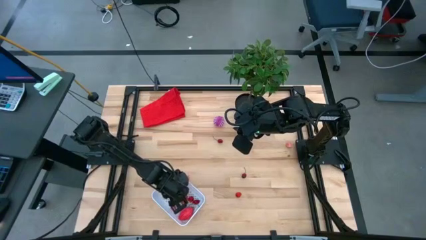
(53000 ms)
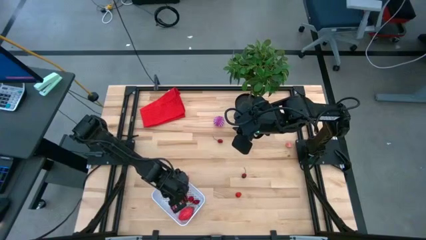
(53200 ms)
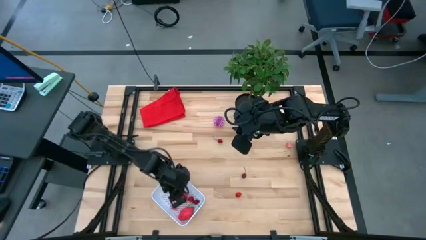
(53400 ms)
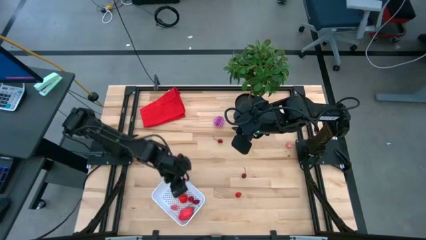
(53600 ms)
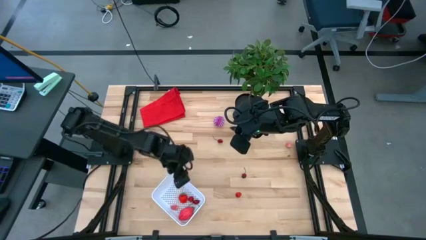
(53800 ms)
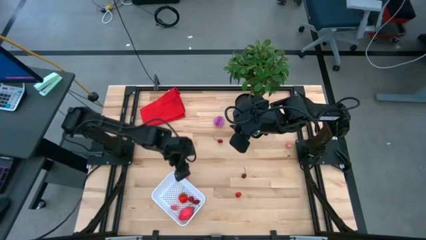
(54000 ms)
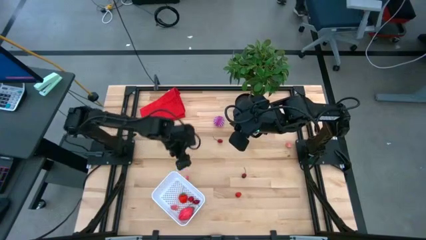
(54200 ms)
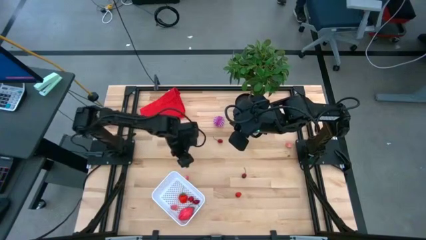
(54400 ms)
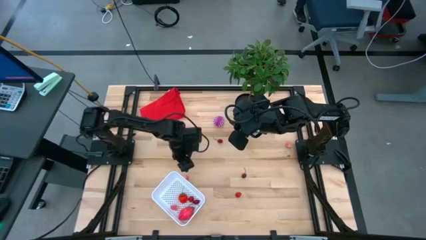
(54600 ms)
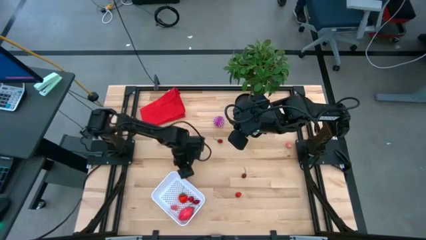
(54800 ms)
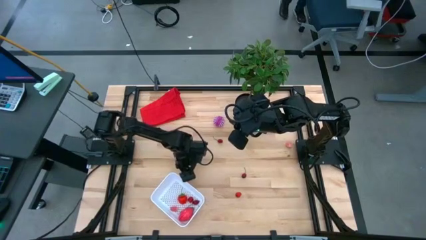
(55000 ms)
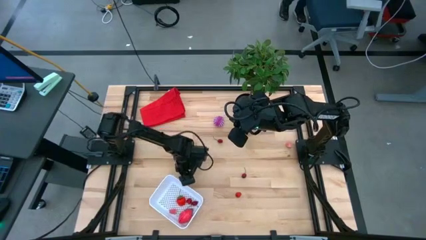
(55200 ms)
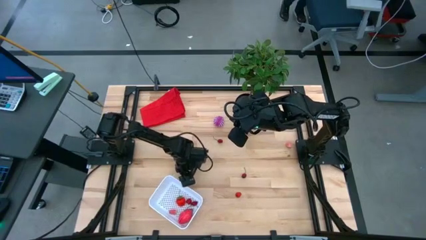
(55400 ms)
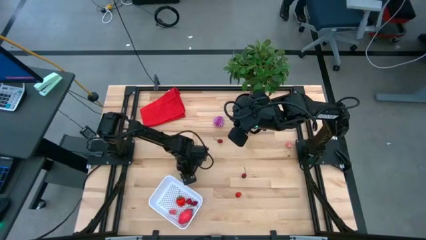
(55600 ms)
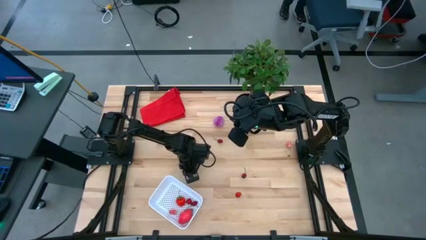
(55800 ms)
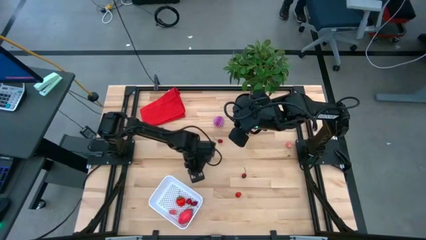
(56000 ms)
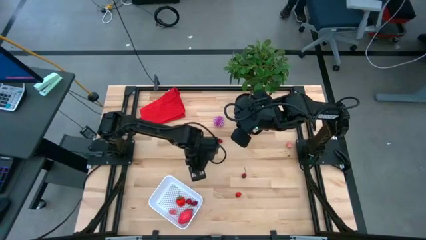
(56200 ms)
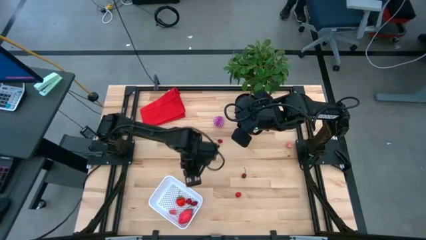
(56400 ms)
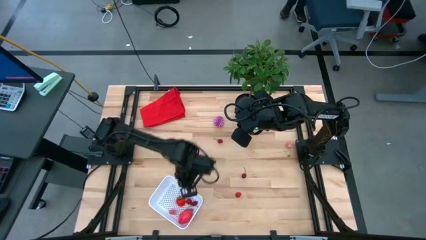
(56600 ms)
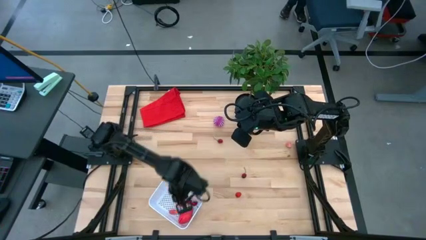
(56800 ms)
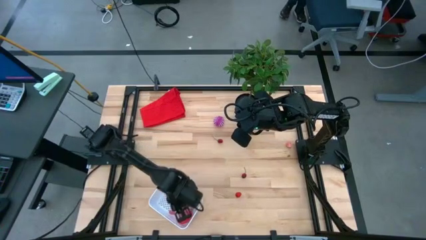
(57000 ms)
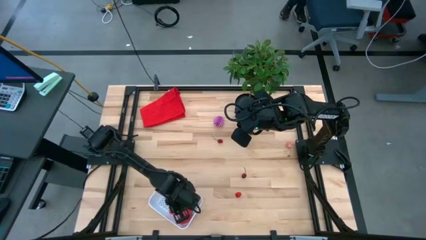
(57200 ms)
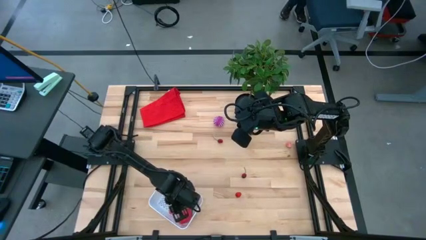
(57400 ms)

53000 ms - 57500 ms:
Task: Pick and placing Produce into tupperware
Put the peach in the basket

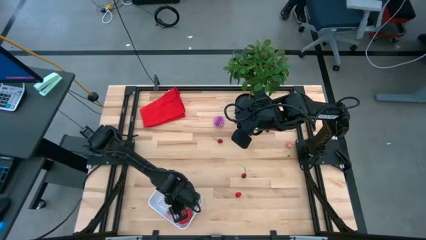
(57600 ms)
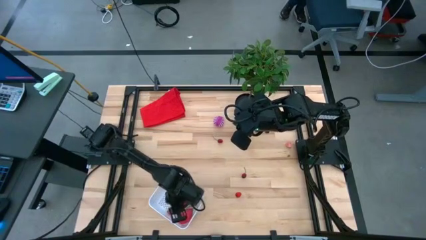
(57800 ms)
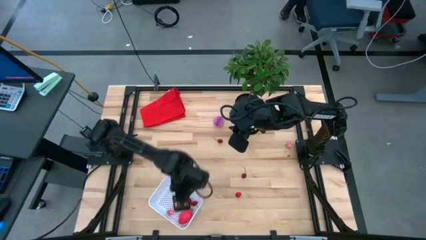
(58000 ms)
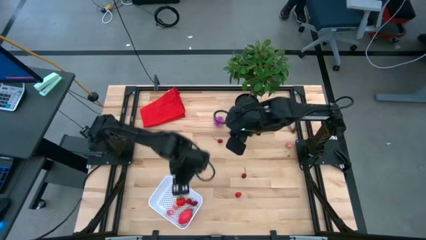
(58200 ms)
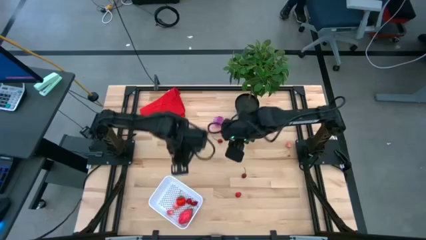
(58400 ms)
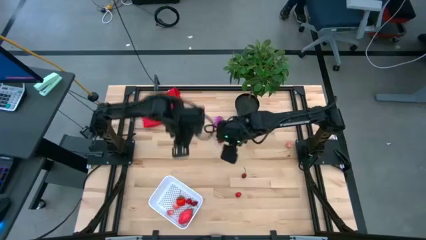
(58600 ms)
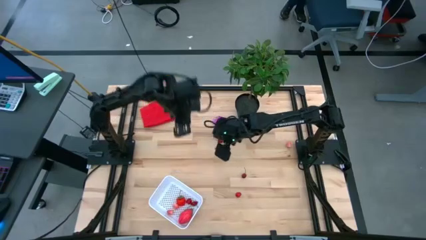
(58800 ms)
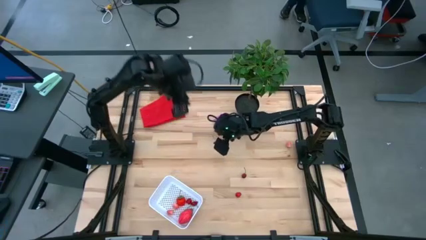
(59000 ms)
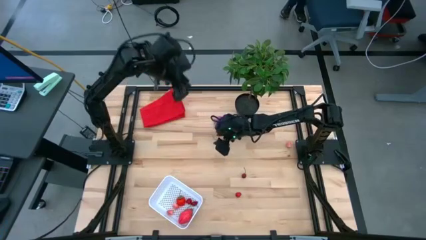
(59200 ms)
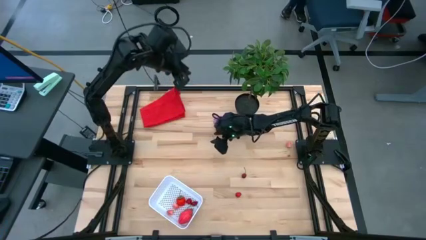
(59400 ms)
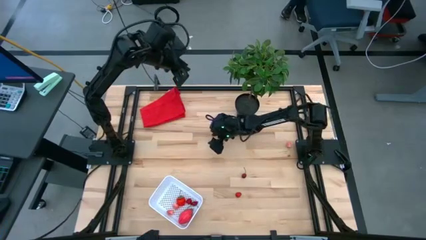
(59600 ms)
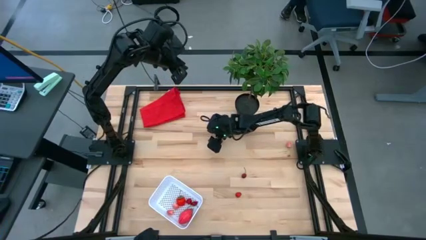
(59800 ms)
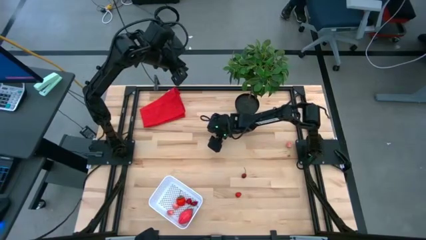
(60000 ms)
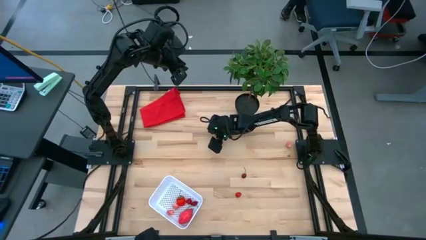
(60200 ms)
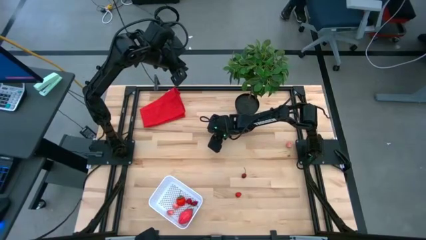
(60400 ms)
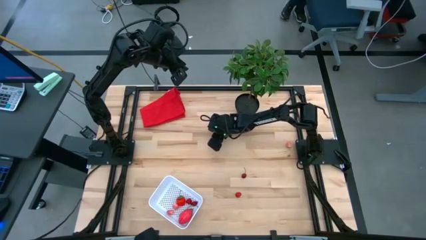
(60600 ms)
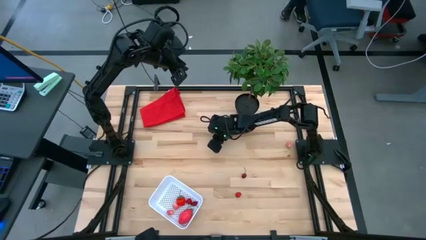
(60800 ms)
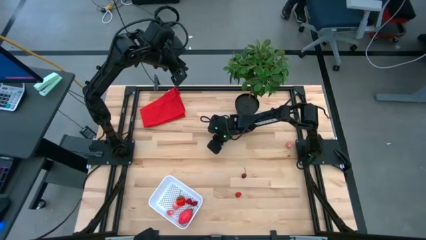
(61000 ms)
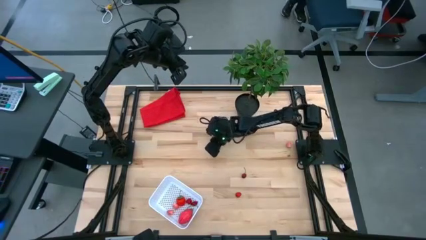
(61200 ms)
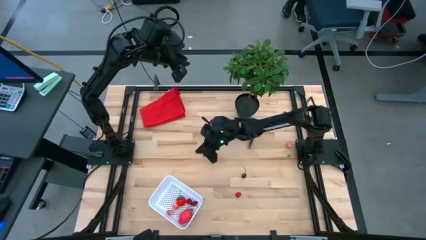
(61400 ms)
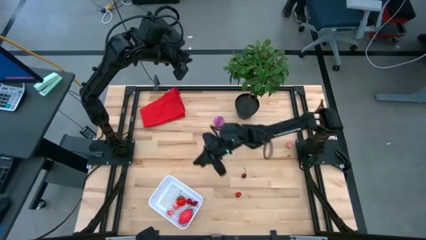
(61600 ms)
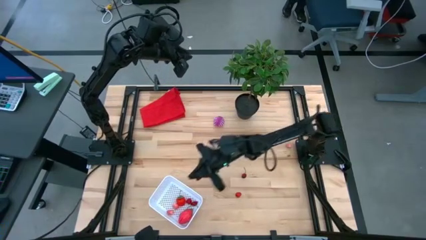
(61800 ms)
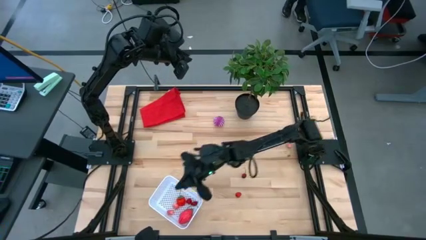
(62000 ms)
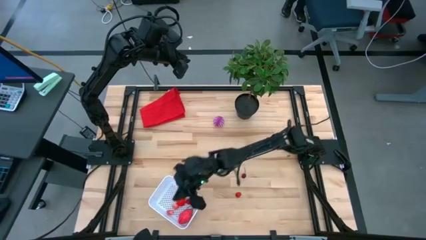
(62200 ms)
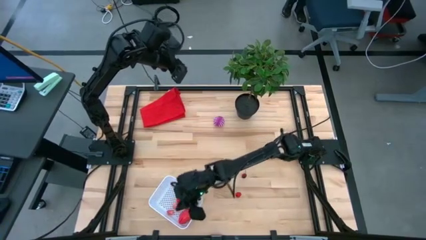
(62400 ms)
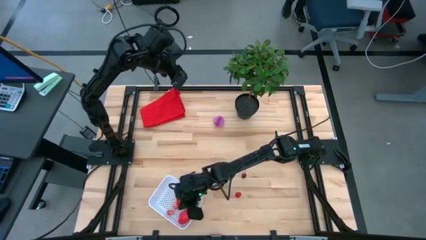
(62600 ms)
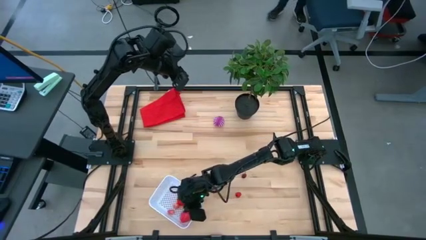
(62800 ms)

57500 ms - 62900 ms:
Put the top cherry in the basket

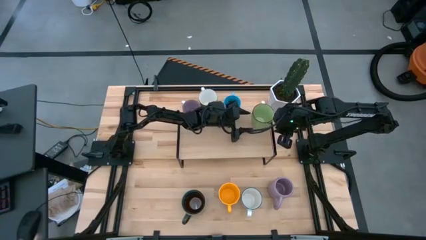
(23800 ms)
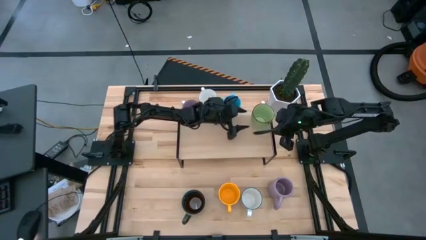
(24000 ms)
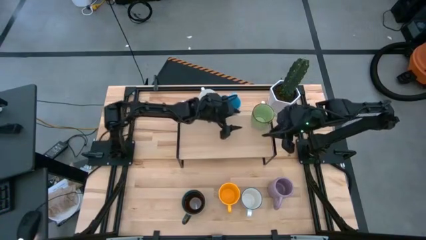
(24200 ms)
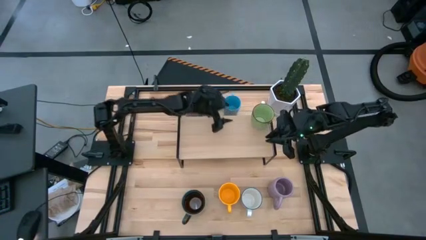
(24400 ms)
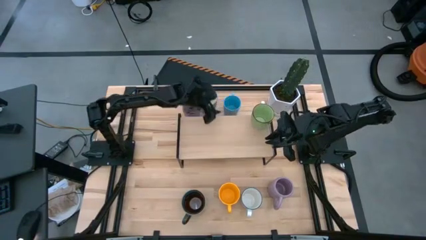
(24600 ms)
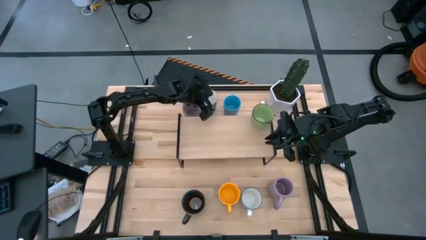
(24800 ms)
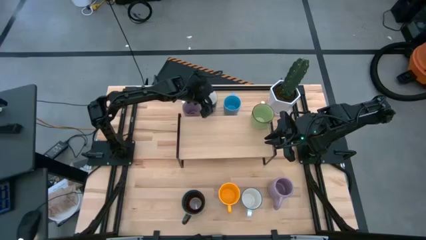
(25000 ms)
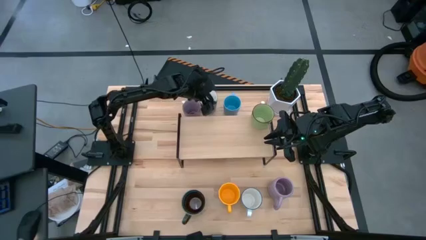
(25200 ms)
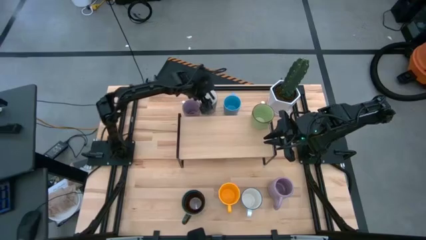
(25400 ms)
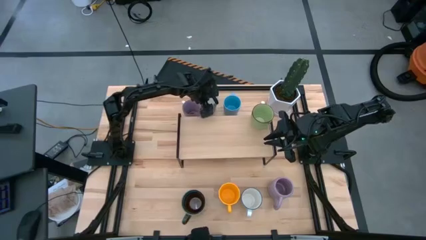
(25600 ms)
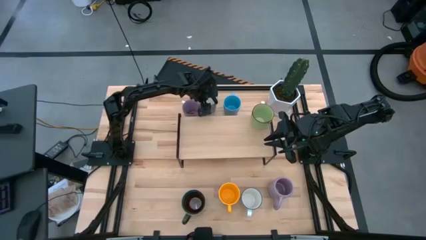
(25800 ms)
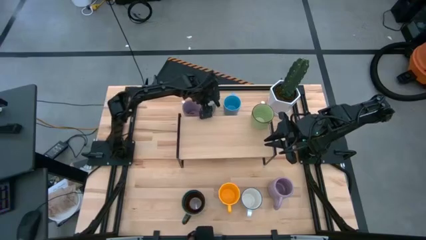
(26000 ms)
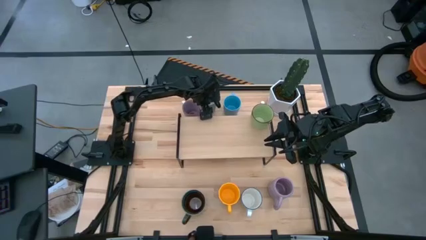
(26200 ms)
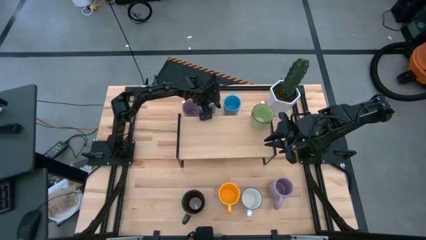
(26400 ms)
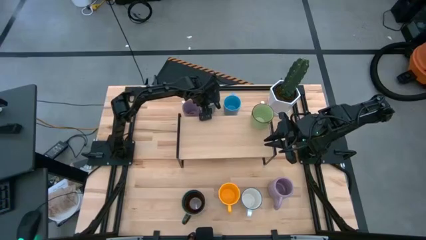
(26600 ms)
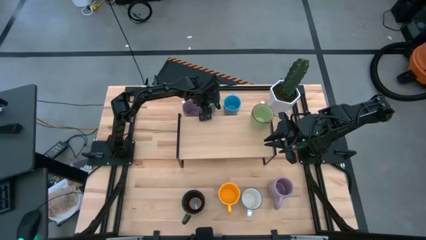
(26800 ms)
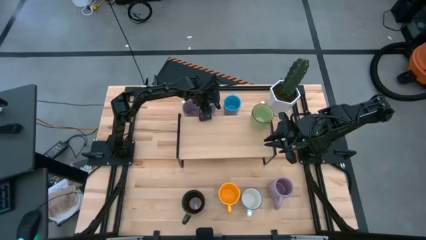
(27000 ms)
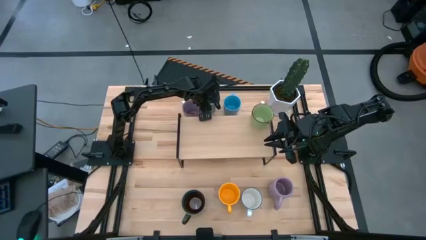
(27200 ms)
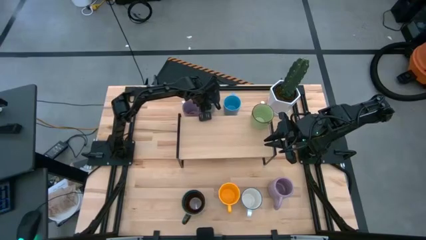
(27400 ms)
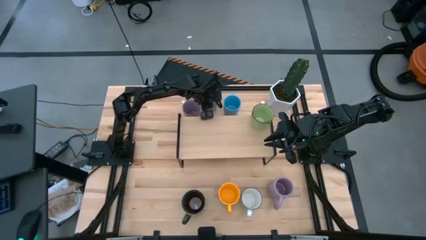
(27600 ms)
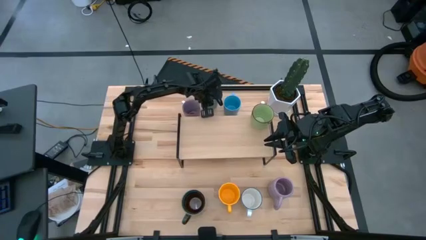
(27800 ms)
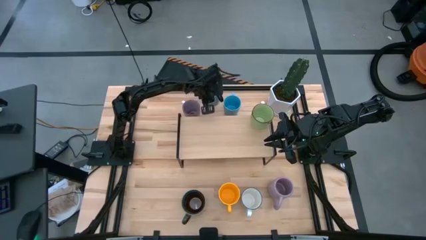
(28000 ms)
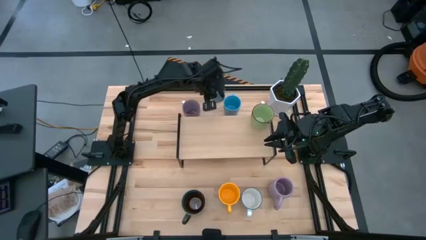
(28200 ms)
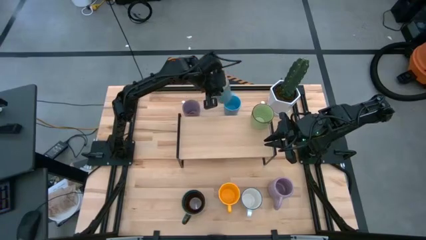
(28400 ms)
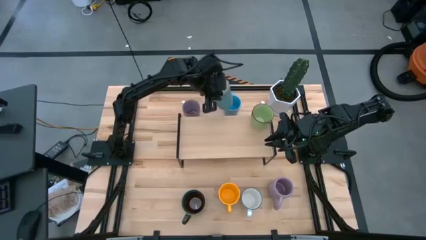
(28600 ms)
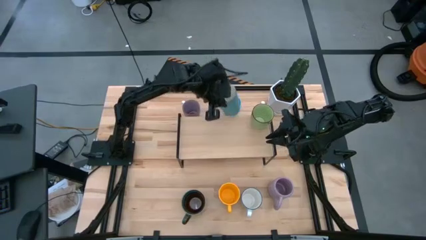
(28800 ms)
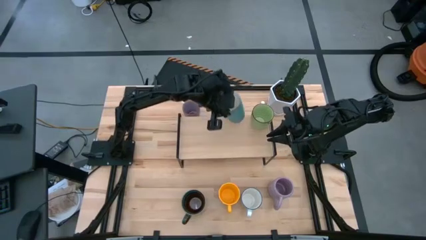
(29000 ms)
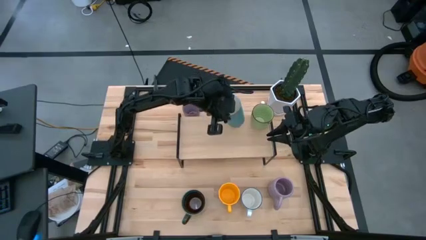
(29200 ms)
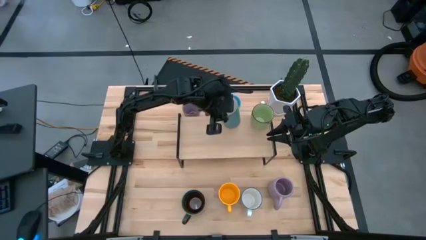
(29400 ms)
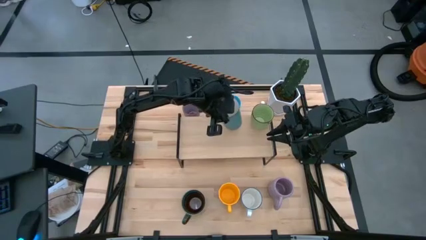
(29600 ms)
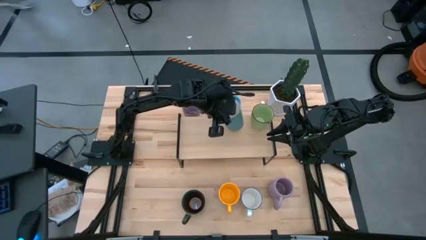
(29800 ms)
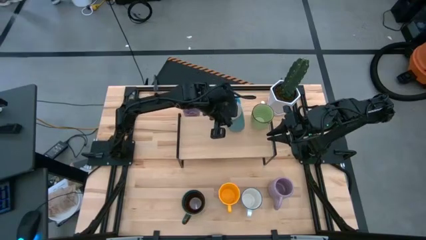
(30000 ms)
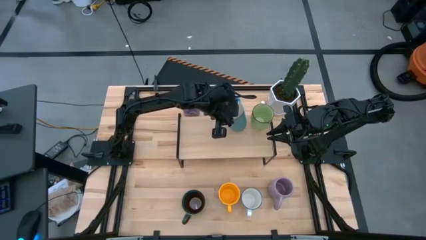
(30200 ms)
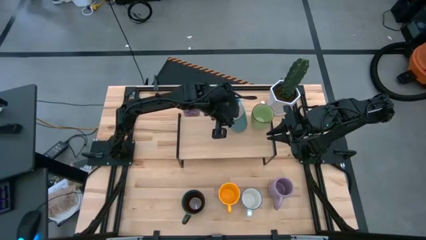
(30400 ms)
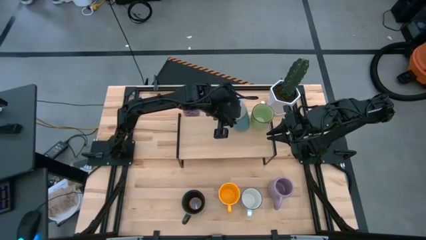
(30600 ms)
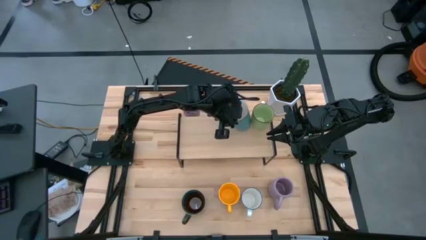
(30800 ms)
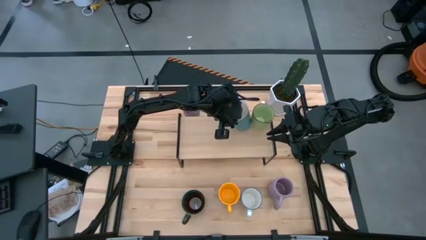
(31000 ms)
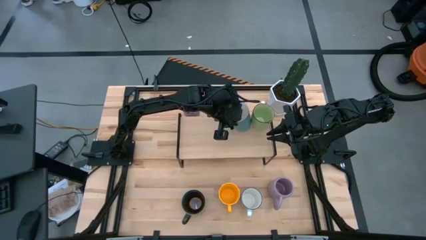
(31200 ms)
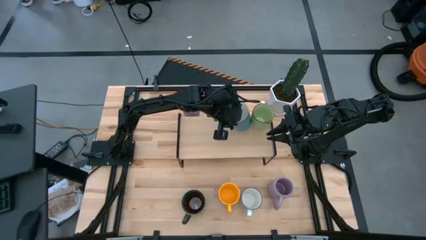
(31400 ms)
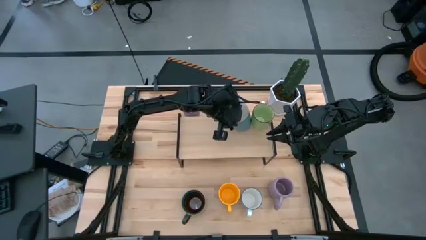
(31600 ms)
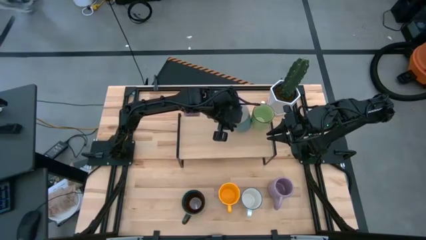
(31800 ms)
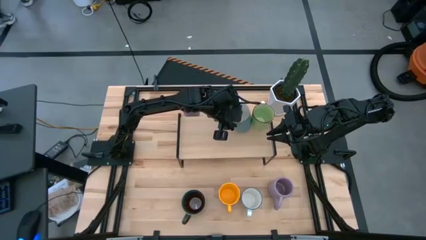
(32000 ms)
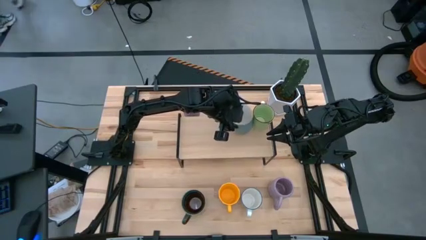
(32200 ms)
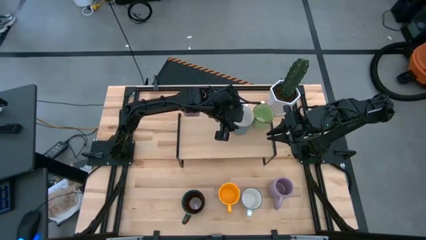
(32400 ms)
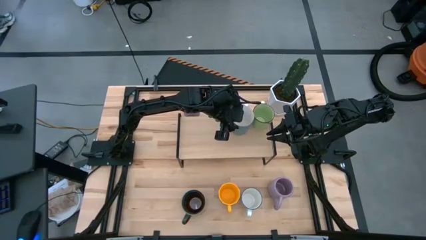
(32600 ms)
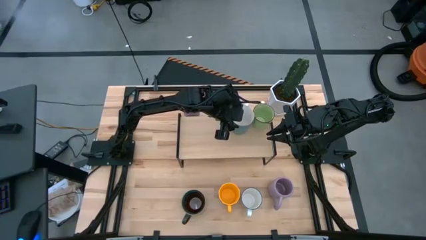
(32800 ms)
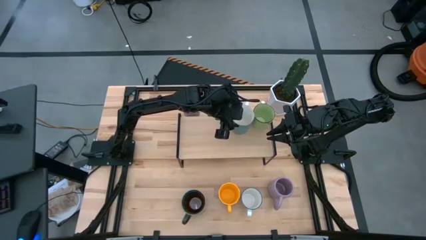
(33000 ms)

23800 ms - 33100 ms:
Task: Place coffee mugs
Put the light blue mug on the shelf
